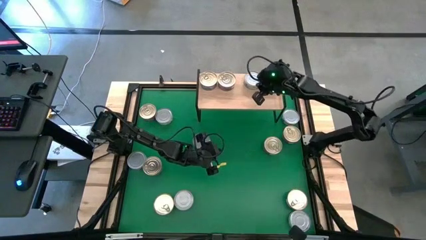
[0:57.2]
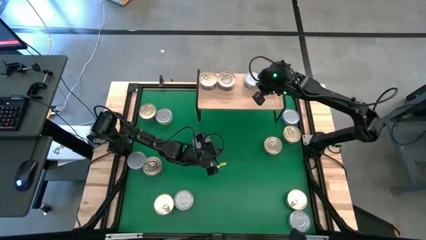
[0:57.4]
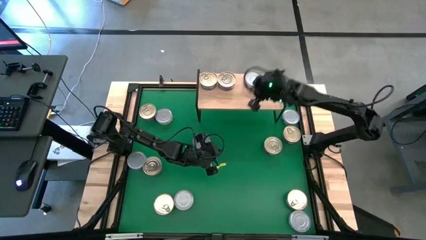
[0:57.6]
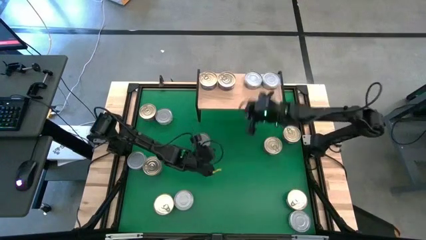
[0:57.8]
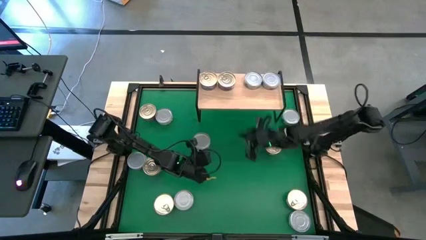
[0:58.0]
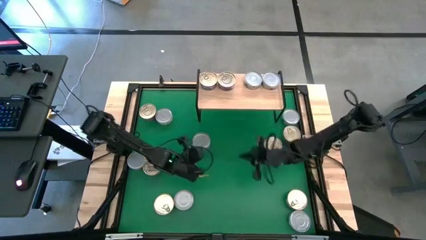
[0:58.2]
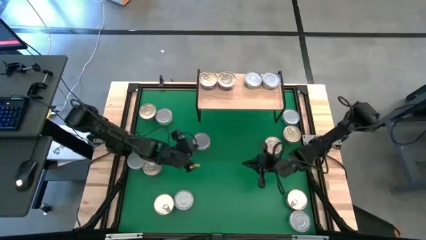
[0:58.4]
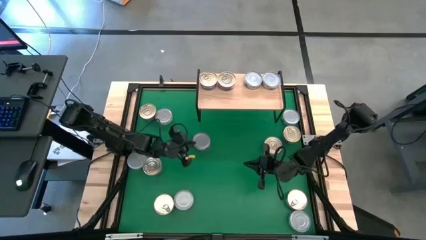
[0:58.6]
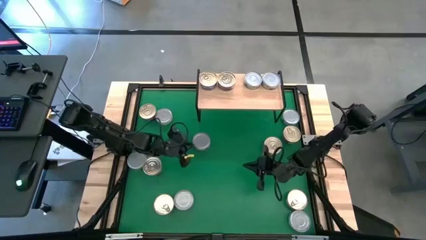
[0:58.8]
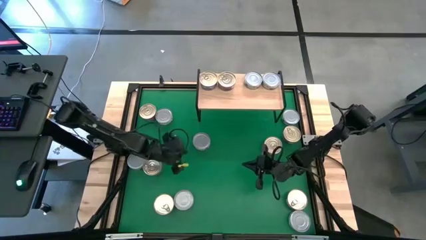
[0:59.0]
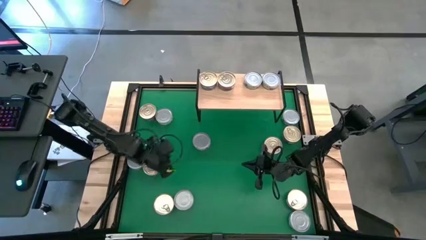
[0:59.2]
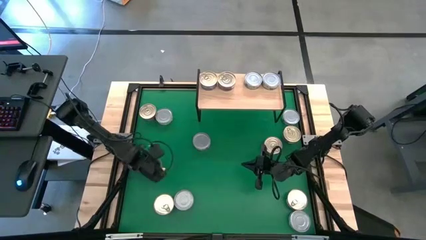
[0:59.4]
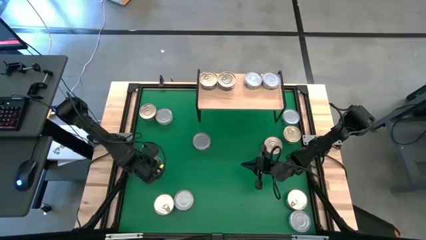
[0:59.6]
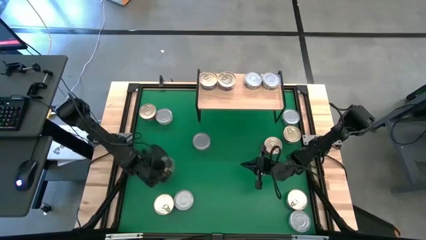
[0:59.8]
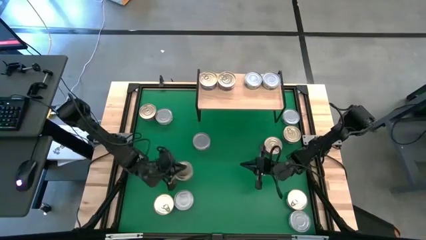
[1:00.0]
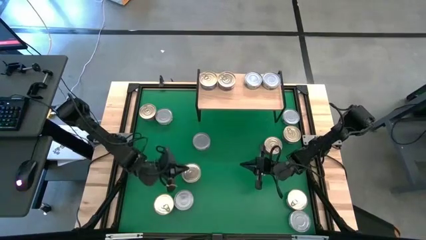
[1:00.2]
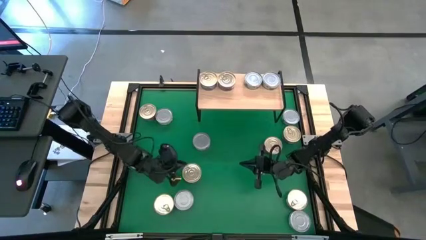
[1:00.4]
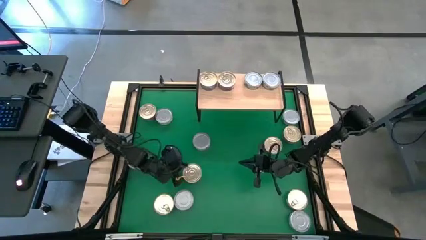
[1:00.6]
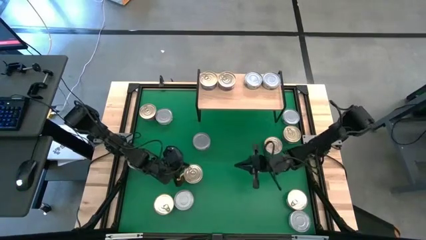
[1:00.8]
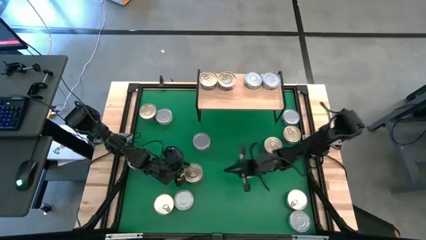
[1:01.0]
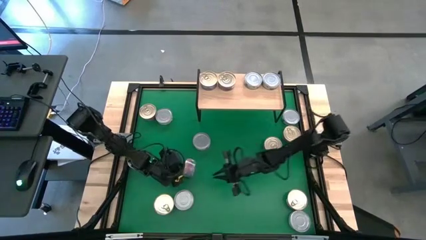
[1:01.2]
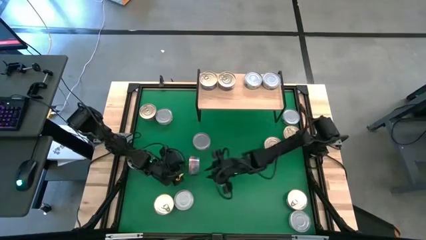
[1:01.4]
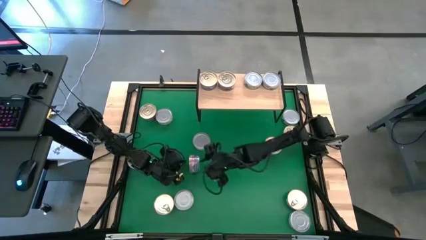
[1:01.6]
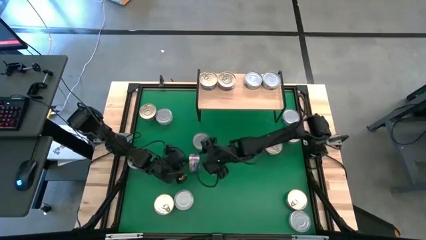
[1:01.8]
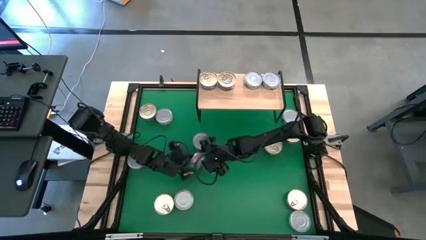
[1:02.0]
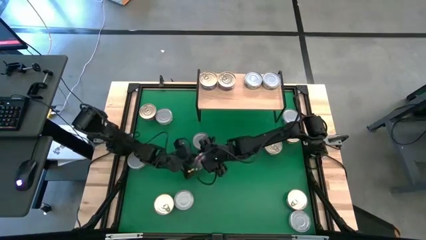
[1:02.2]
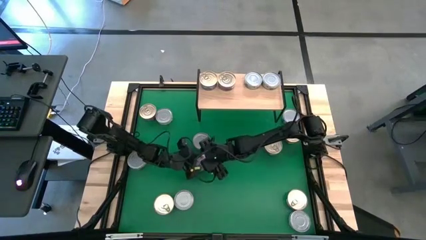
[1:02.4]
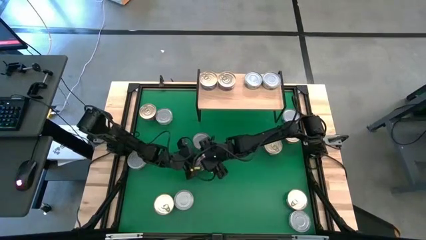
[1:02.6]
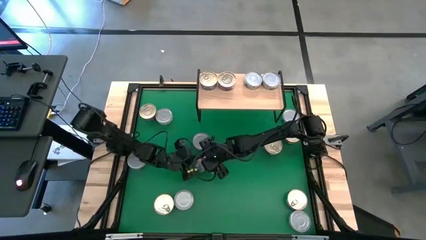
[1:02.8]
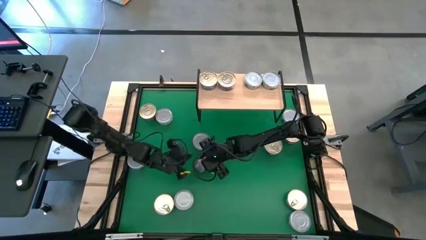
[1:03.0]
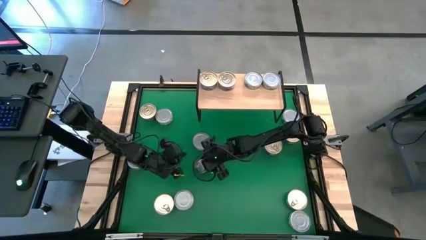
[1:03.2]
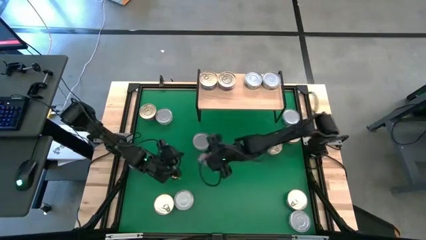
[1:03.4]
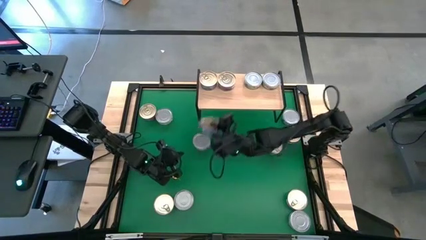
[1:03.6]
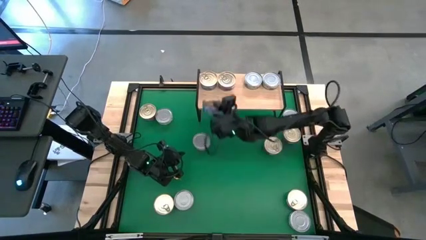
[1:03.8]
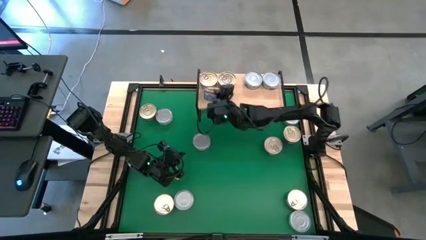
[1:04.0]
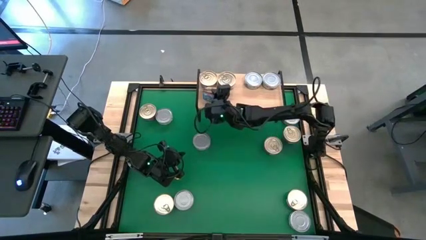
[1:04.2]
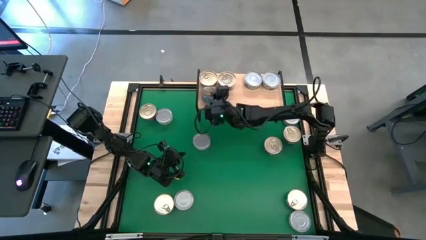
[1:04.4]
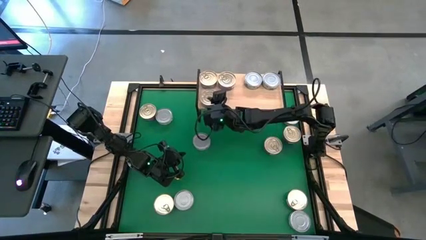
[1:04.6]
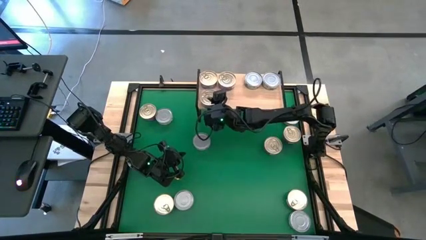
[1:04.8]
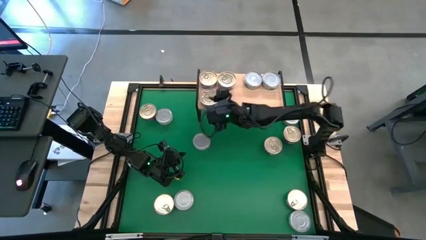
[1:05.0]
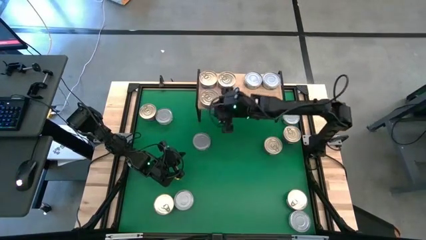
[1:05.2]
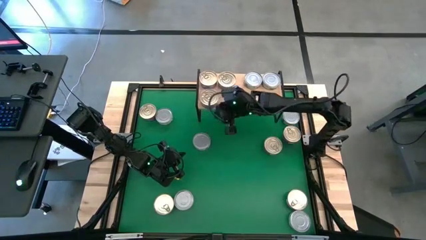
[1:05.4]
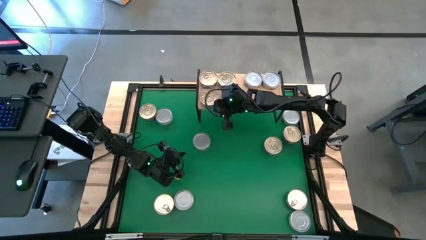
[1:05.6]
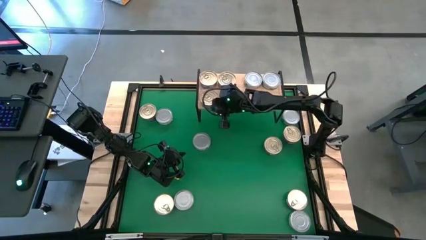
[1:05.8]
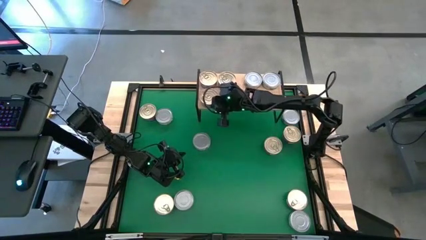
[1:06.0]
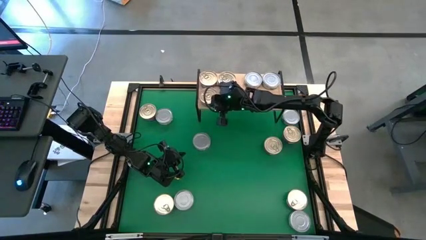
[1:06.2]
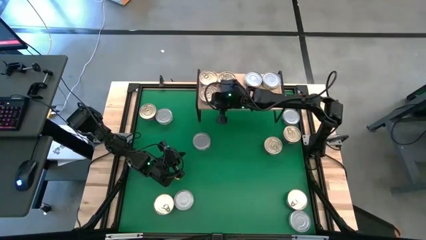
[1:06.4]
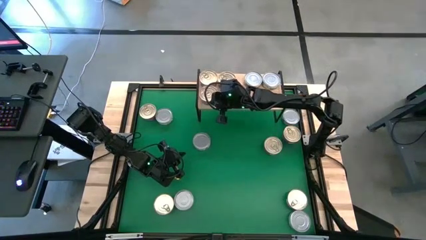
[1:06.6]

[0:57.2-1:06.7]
Task: Stack canned seafood by type on shelf
Put the blue pink tuna can on the shelf

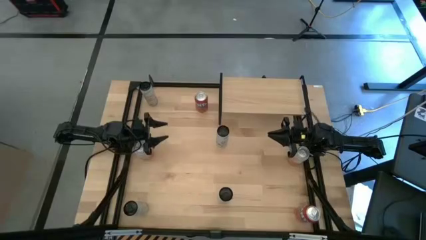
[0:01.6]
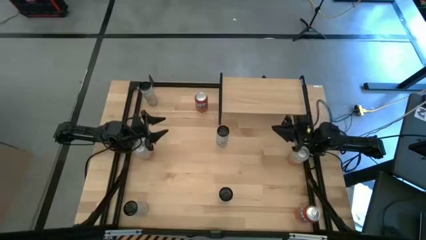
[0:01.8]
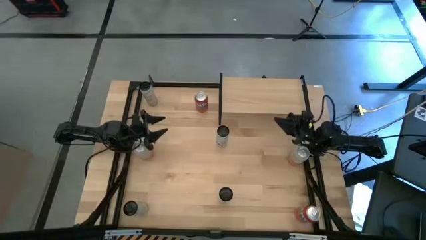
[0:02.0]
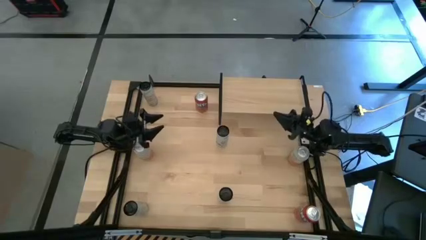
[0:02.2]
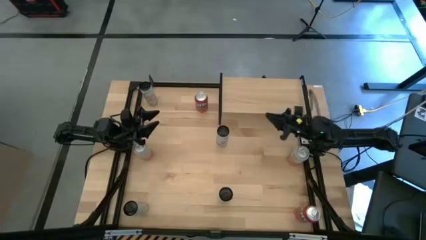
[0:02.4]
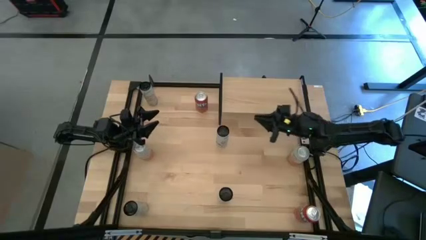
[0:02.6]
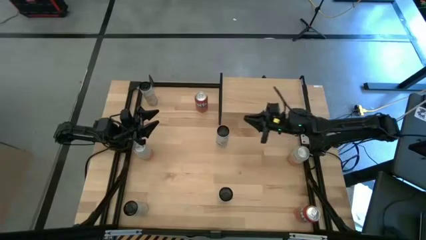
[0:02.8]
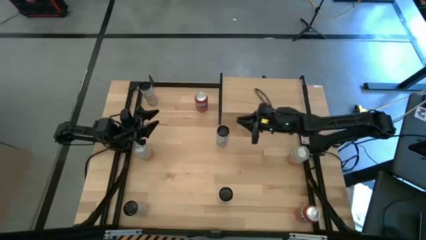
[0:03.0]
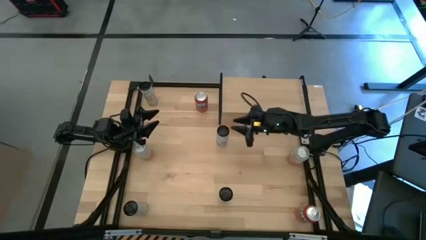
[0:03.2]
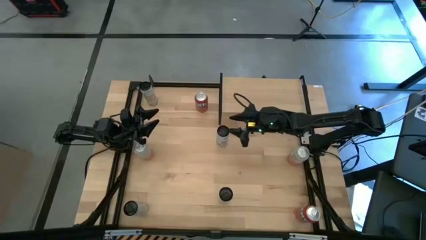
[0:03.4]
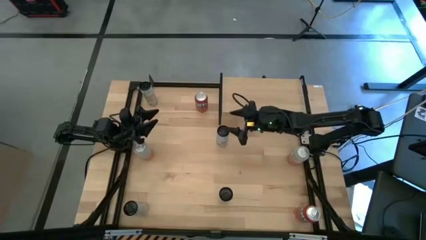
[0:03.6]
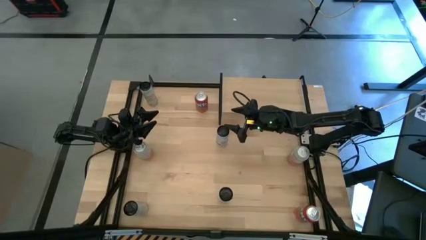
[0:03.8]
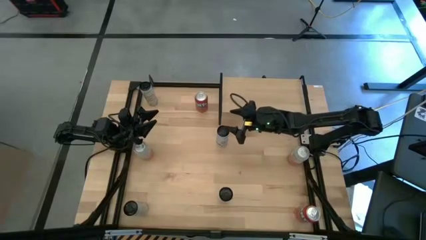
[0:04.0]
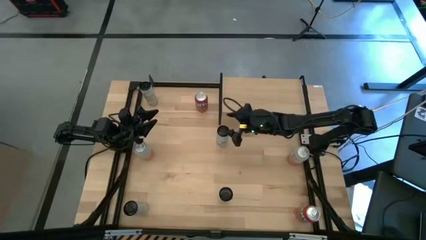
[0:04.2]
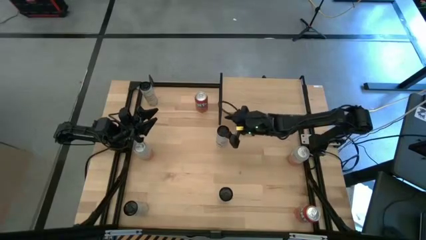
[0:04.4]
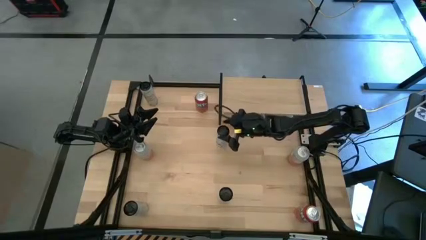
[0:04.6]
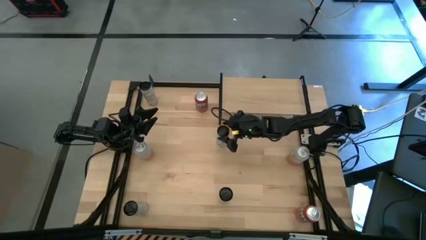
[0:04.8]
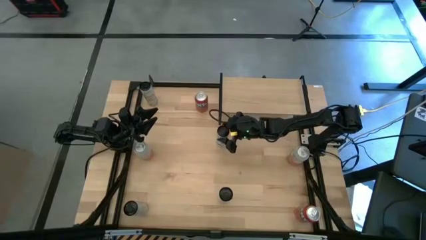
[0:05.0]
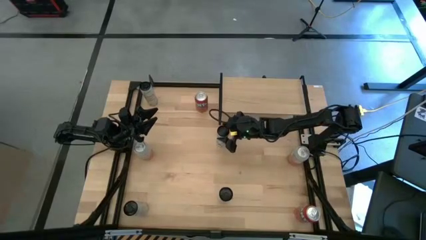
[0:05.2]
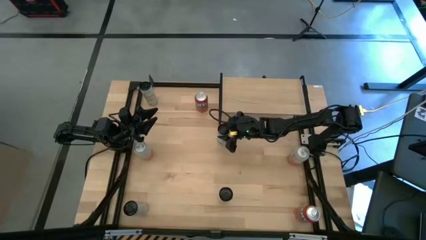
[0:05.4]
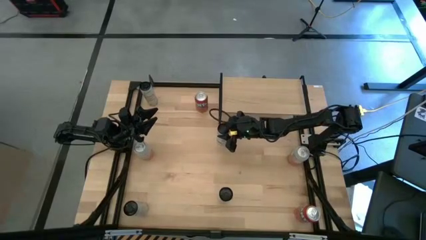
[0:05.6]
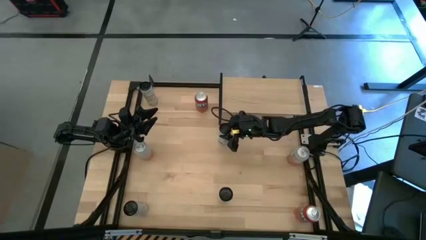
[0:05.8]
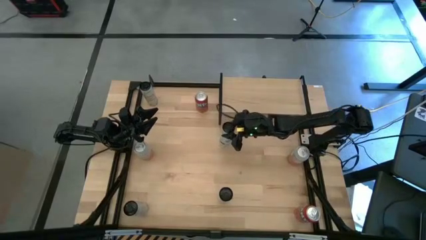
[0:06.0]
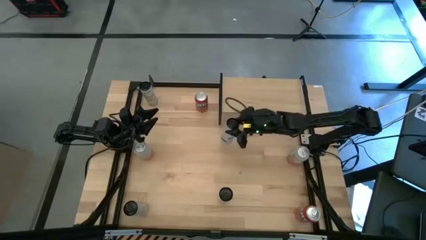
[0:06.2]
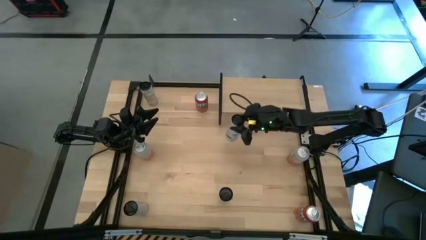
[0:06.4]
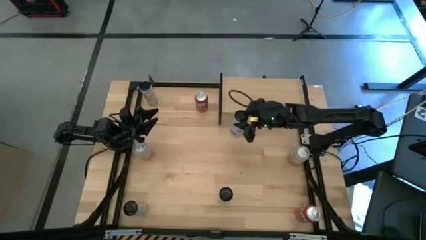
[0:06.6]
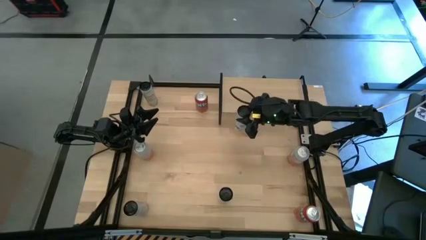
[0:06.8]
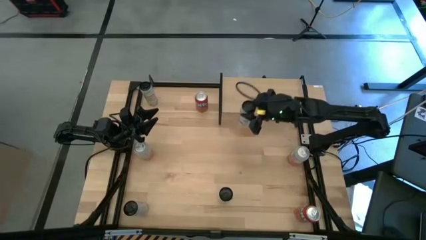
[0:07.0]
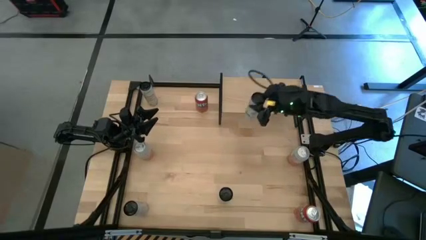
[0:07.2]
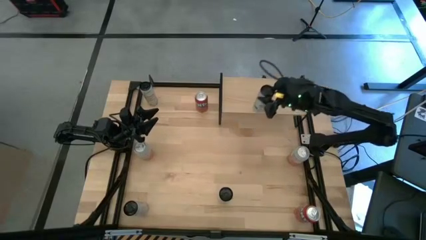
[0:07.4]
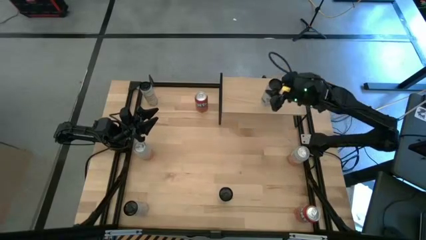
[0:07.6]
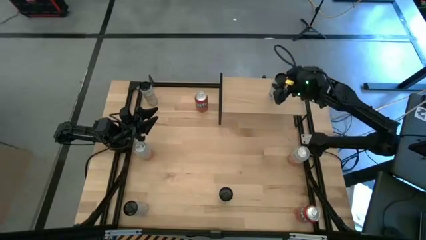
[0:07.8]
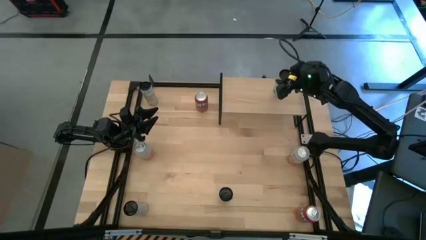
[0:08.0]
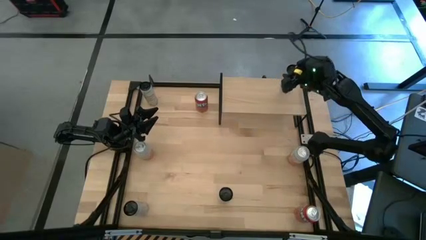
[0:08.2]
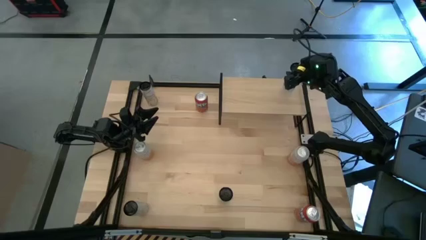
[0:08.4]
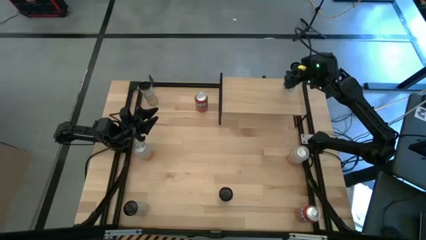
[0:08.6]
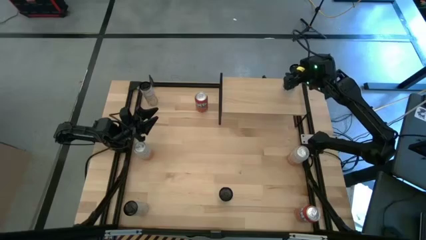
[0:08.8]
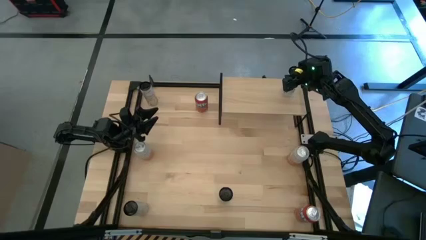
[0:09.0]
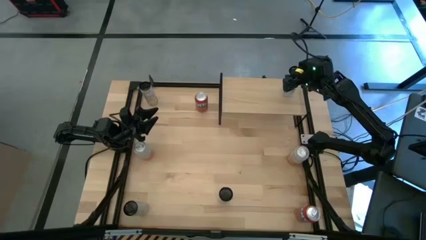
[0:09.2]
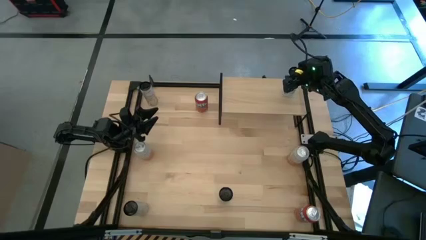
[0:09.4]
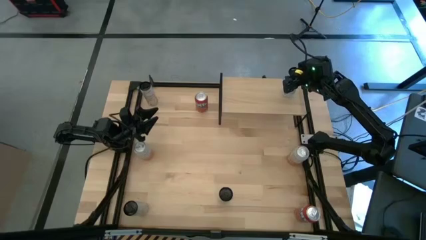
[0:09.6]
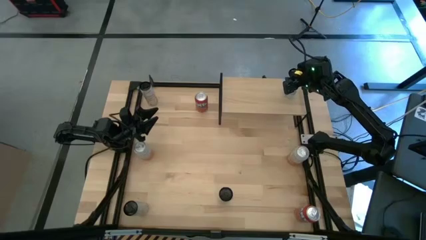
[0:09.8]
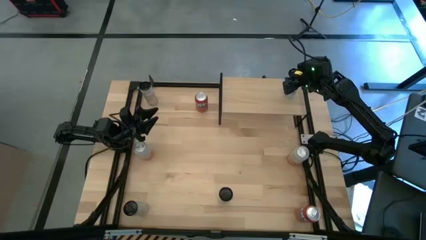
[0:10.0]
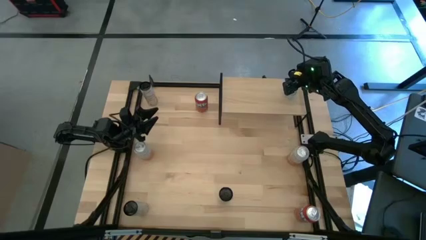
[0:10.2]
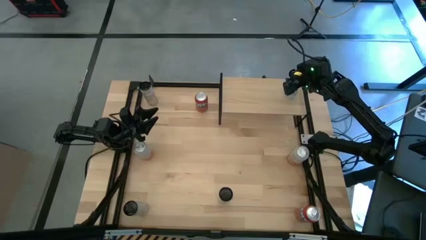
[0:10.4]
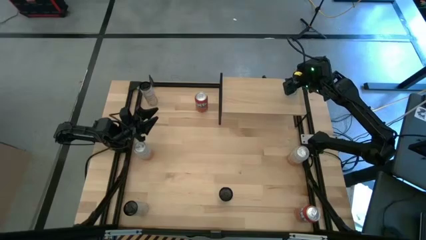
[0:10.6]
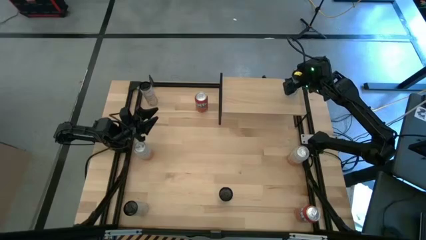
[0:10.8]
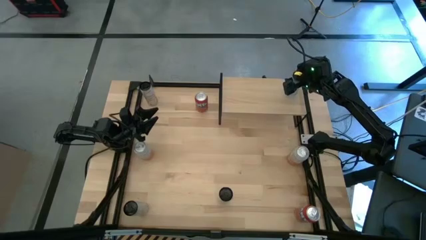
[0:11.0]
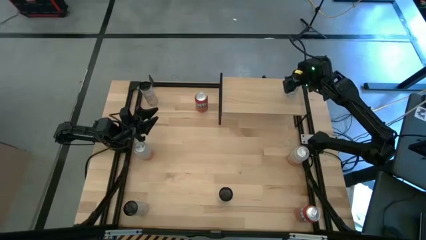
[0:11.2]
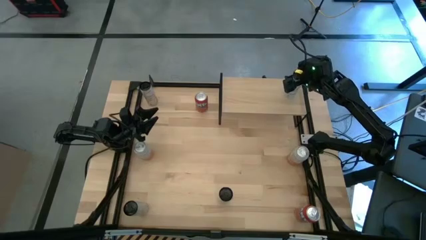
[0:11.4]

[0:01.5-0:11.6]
Task: Place canned beverage on shelf
Put the top white blue soda can on the shelf
